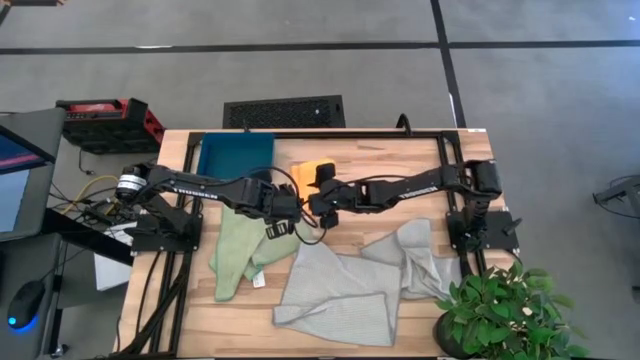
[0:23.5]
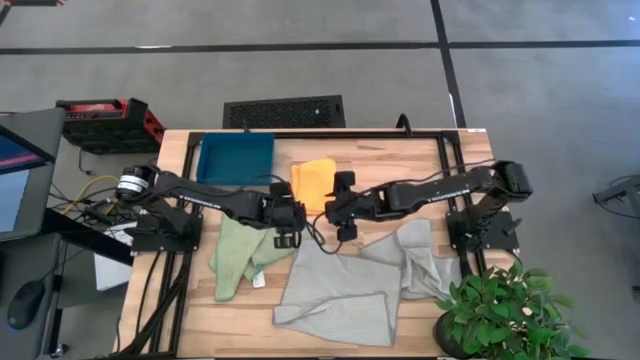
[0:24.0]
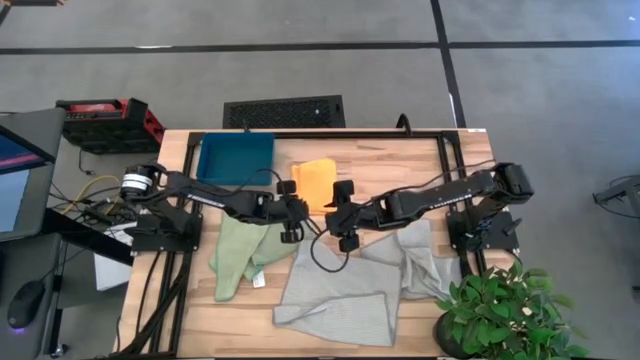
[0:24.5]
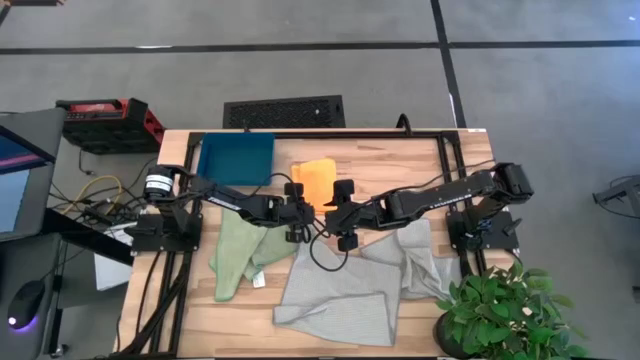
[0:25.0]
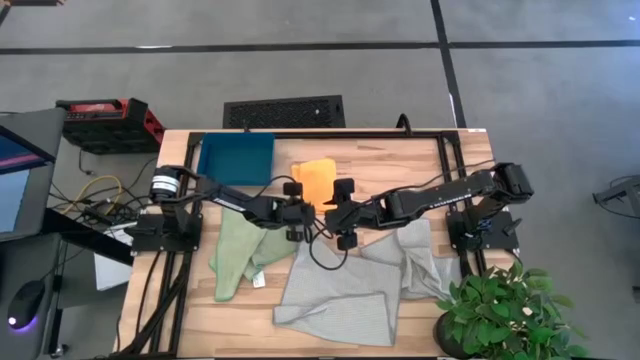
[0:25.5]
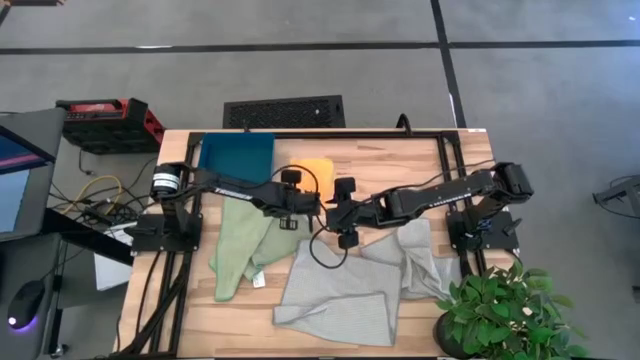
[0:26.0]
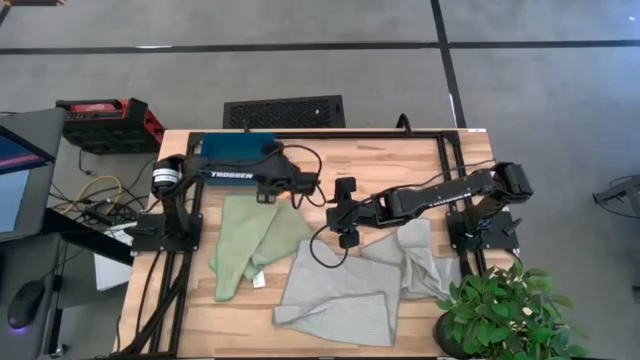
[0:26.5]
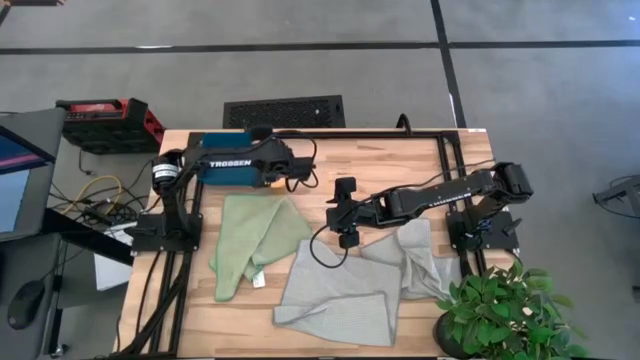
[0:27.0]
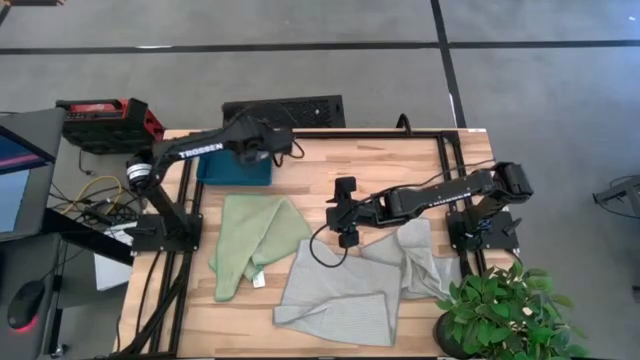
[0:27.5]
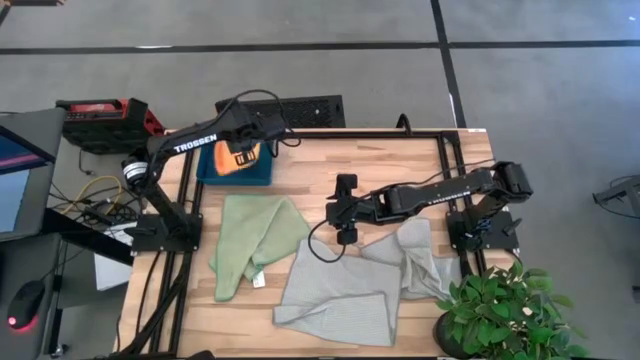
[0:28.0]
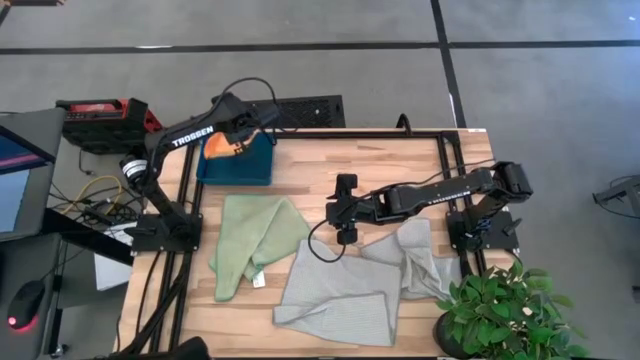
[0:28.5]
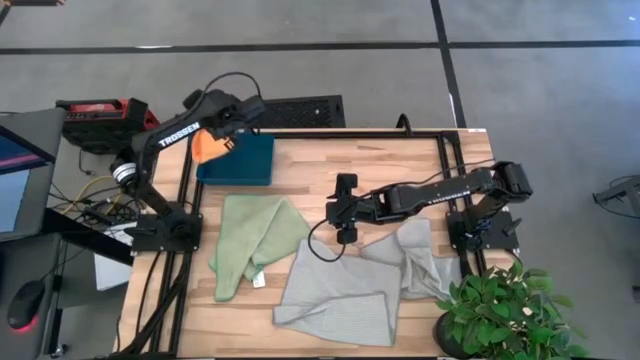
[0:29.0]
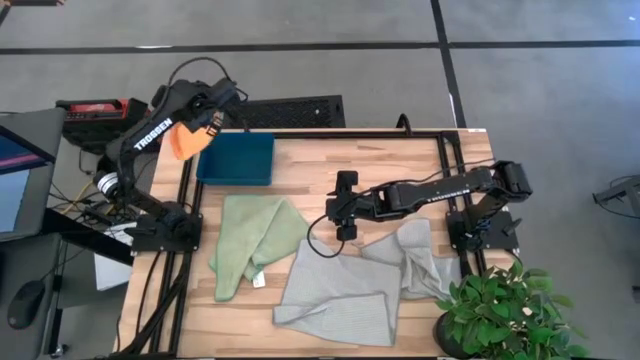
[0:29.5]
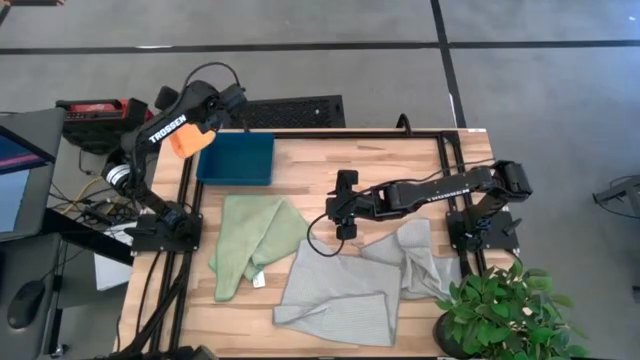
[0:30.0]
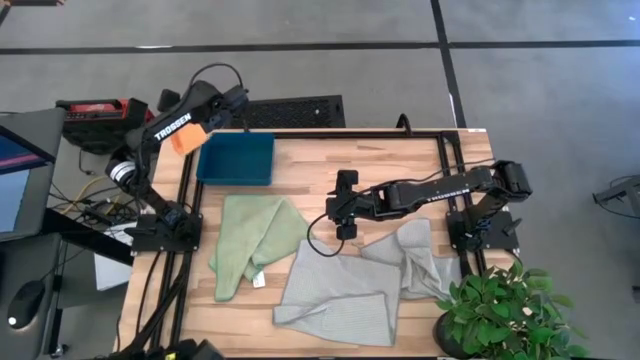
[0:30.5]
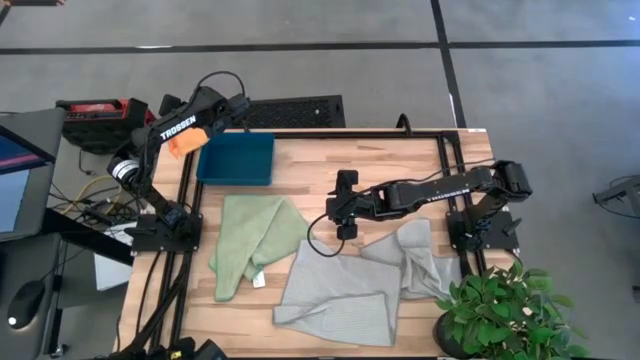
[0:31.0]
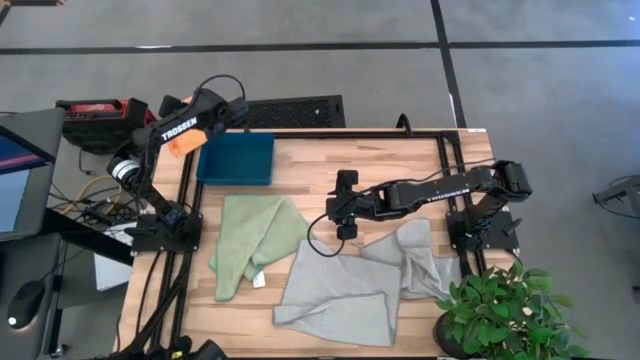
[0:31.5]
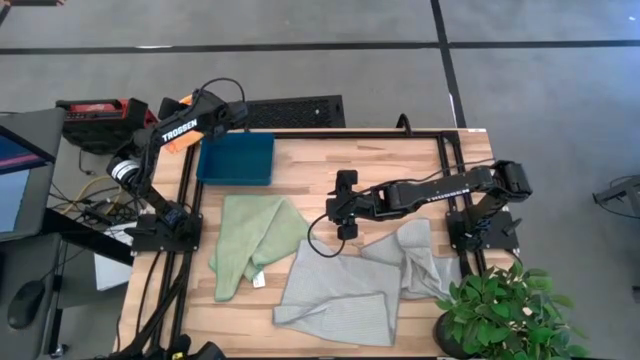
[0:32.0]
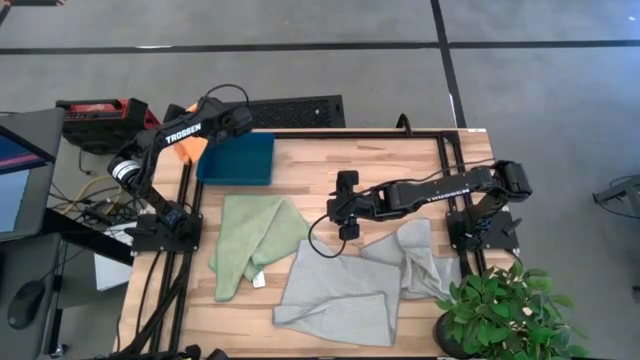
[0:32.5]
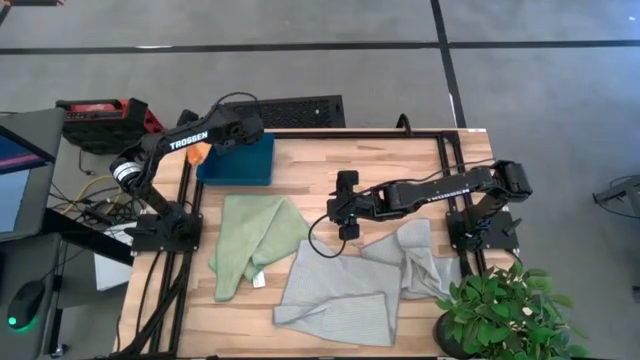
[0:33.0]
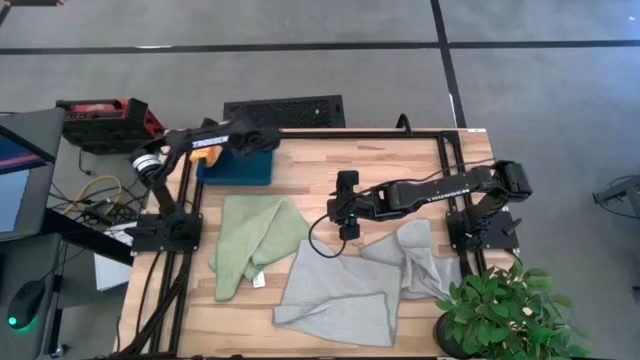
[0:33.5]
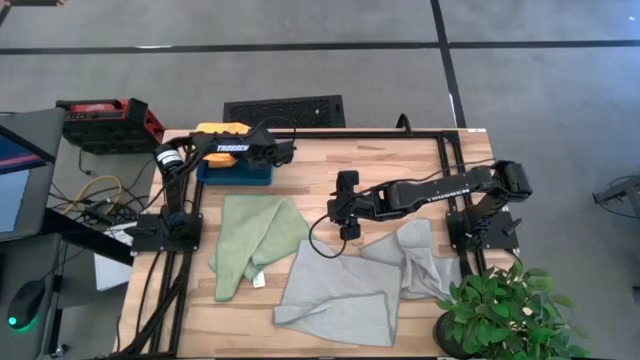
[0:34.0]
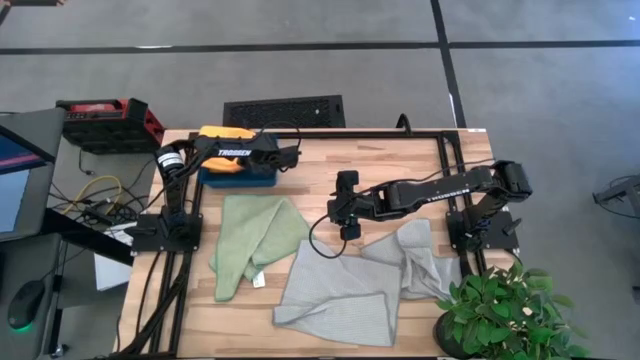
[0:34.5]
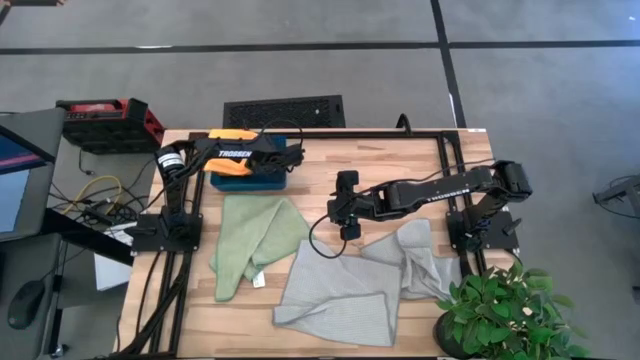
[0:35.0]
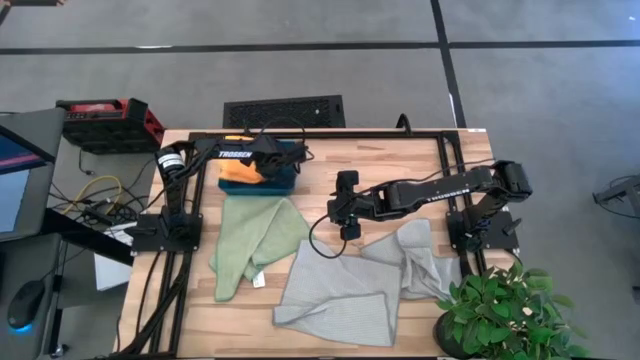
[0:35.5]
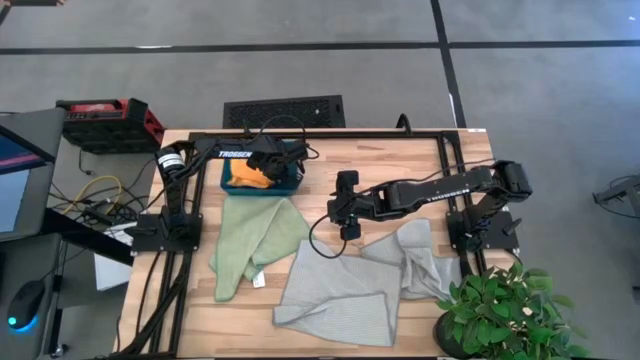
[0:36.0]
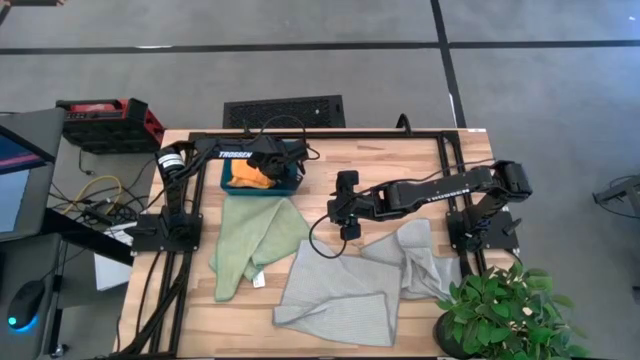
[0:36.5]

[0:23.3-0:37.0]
Task: Fold microfiber towels
Put the folded orange towel into the blue bin

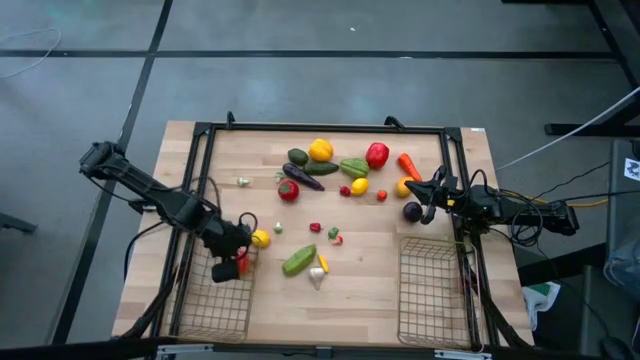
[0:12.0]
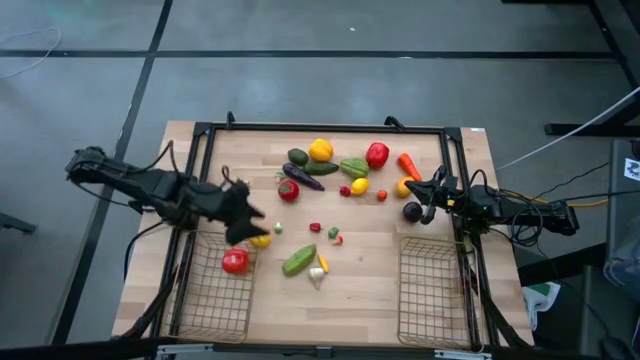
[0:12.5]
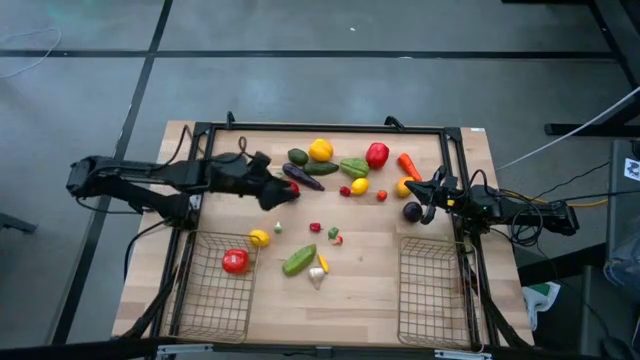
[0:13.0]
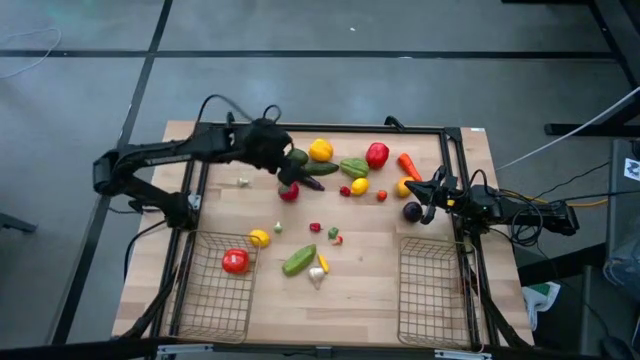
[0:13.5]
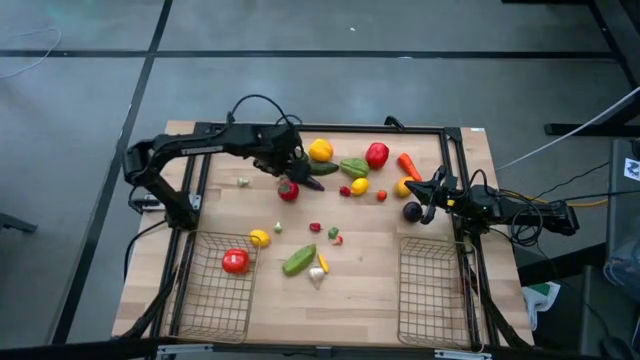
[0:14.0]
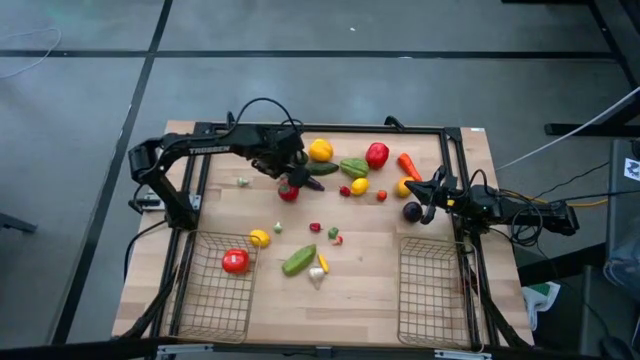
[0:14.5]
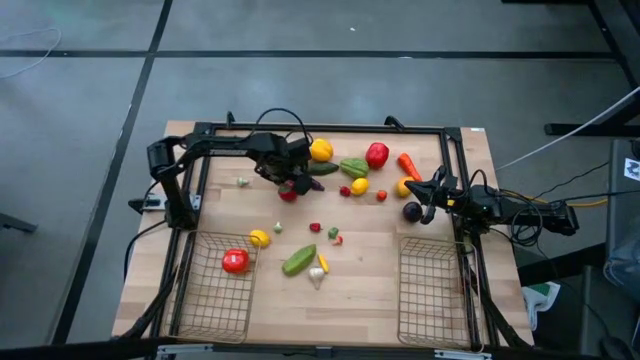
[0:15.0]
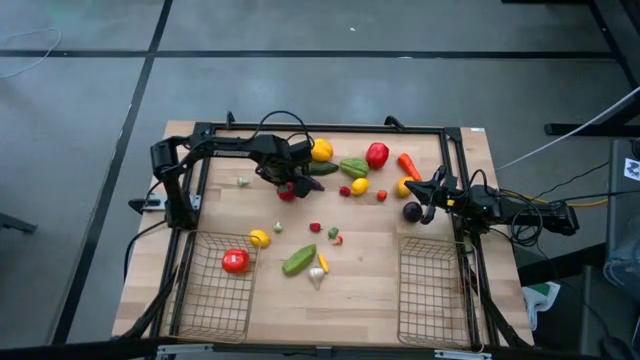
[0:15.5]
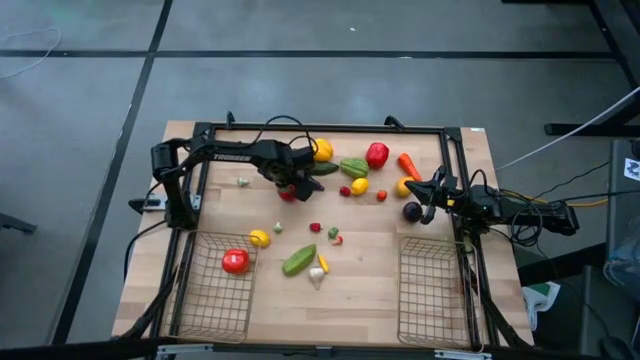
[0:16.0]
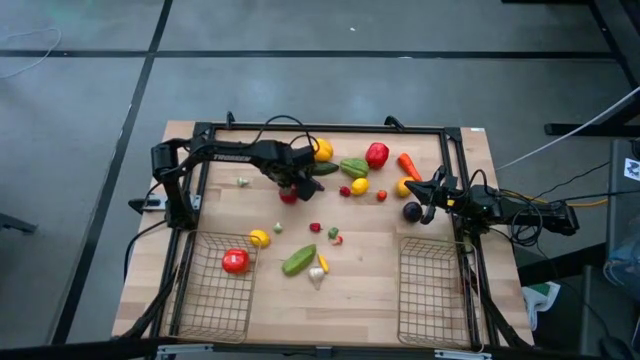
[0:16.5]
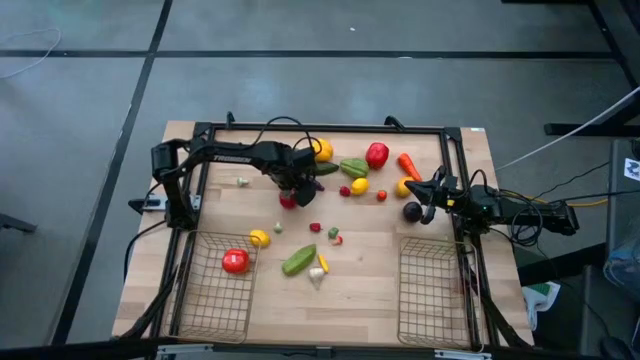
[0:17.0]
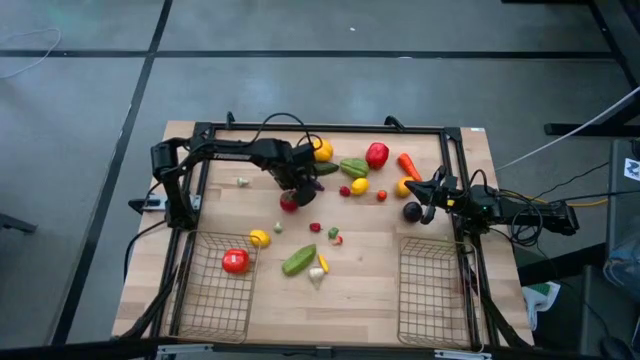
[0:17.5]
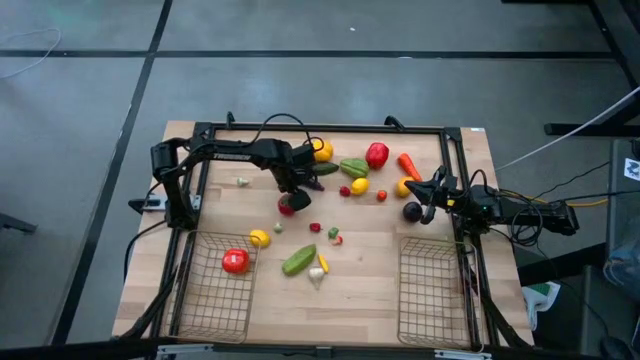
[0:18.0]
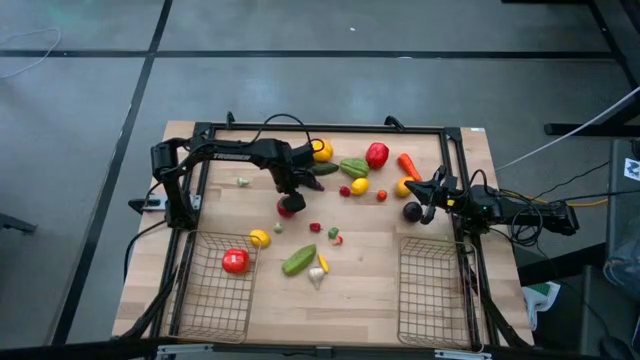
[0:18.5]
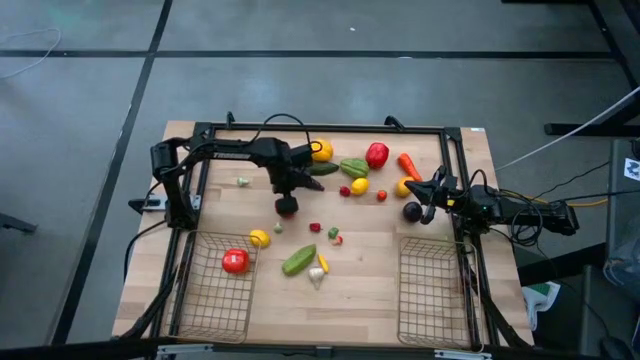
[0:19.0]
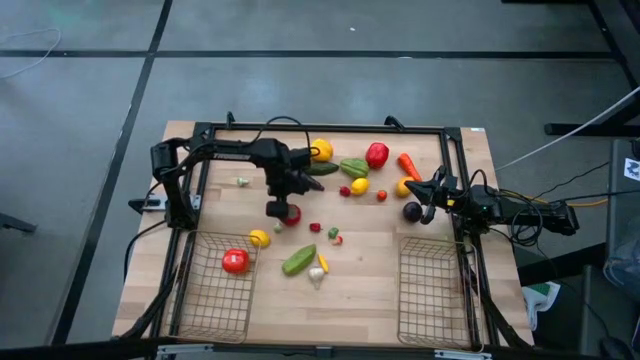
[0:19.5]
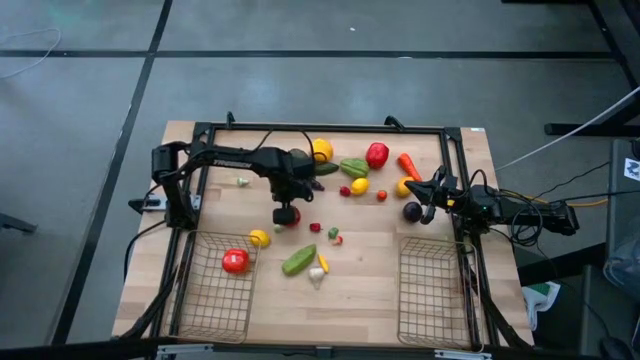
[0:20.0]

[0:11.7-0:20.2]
Task: Sort produce into baskets
Put the red tomato into the left wire basket
